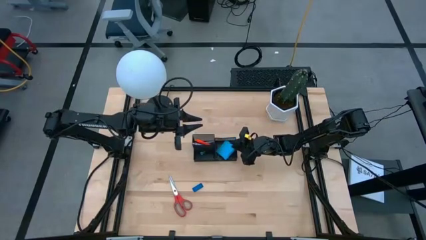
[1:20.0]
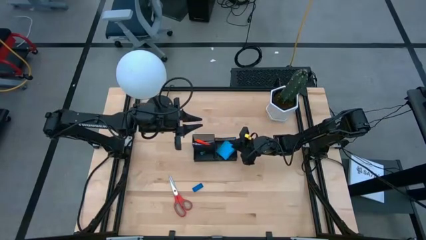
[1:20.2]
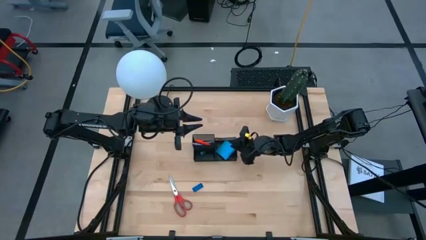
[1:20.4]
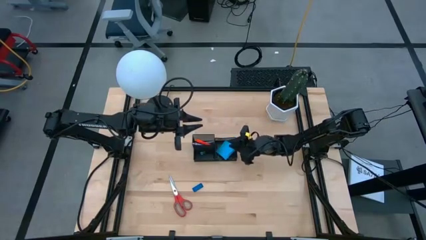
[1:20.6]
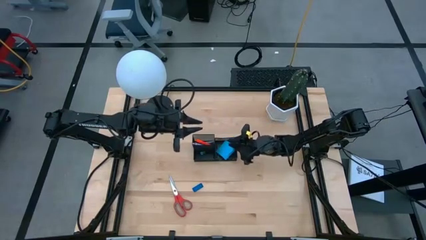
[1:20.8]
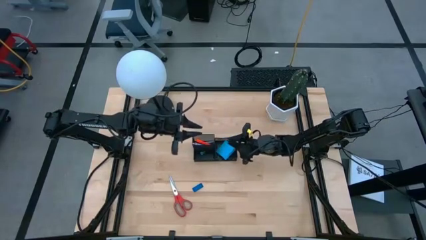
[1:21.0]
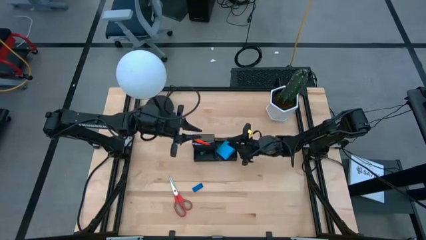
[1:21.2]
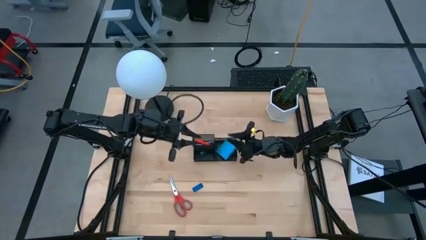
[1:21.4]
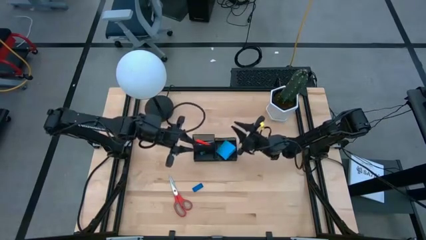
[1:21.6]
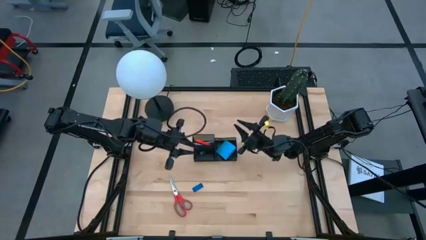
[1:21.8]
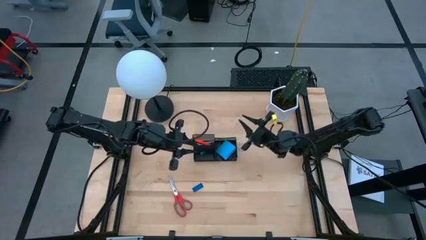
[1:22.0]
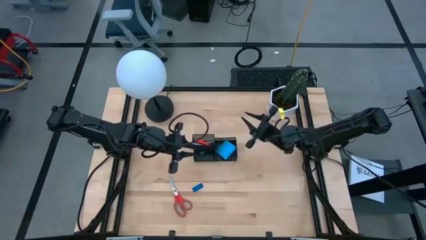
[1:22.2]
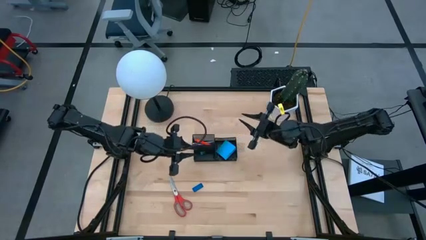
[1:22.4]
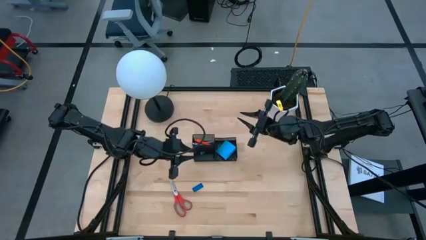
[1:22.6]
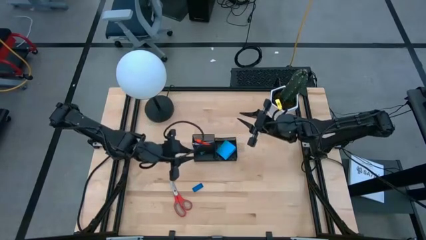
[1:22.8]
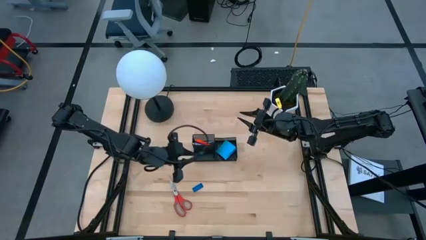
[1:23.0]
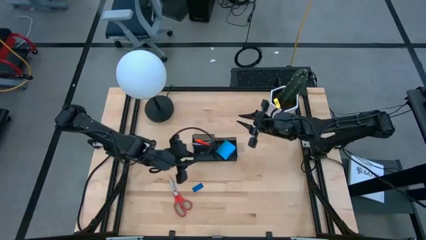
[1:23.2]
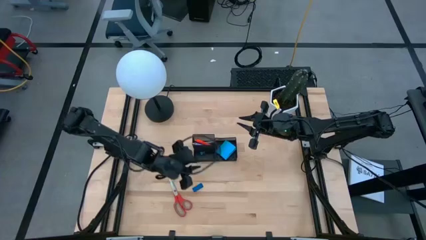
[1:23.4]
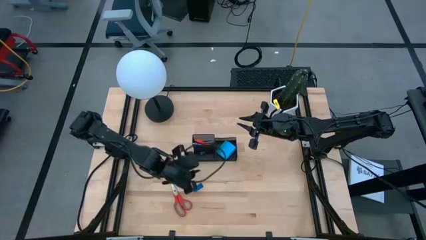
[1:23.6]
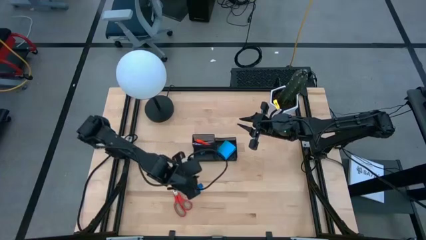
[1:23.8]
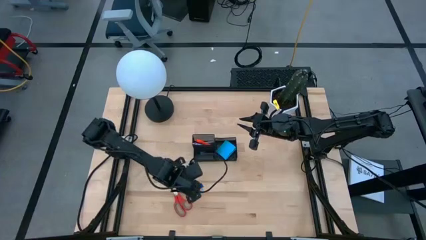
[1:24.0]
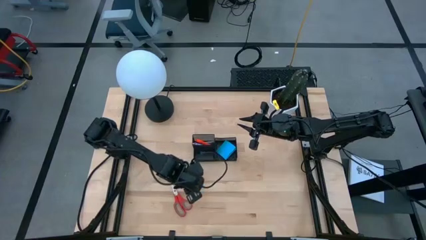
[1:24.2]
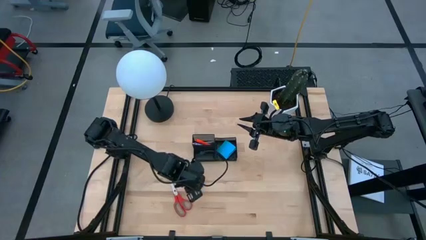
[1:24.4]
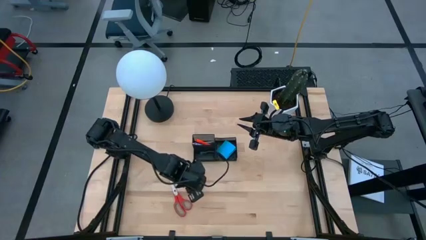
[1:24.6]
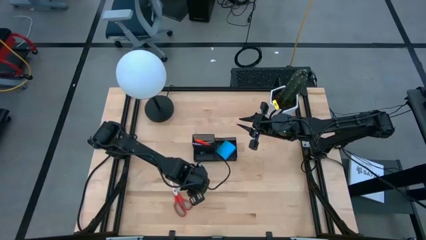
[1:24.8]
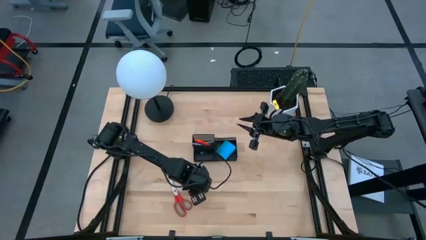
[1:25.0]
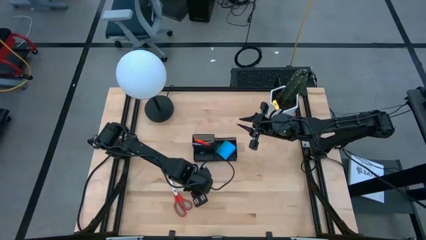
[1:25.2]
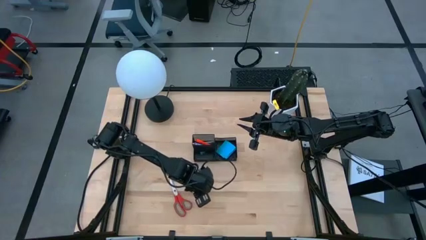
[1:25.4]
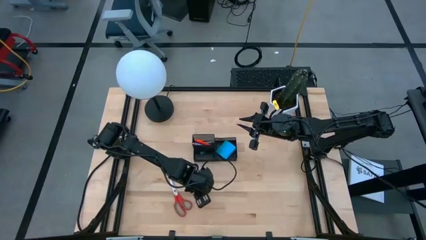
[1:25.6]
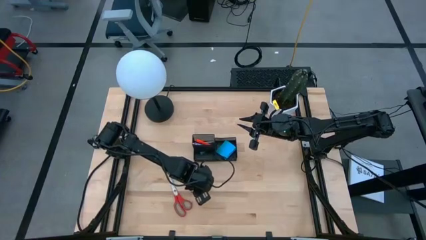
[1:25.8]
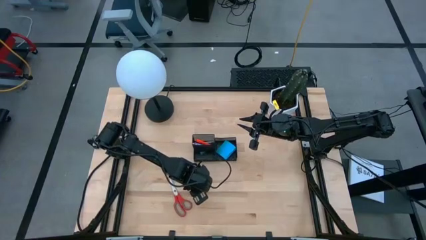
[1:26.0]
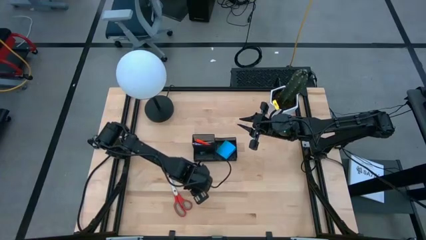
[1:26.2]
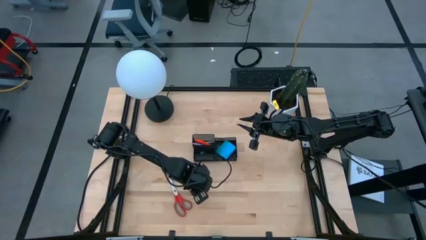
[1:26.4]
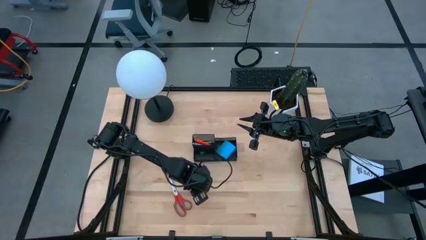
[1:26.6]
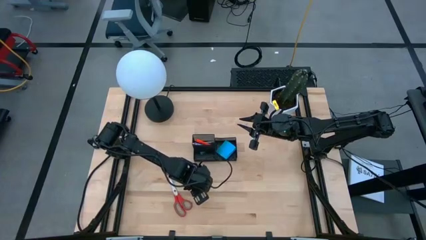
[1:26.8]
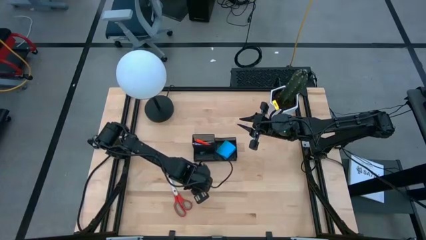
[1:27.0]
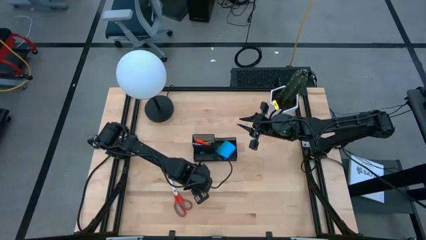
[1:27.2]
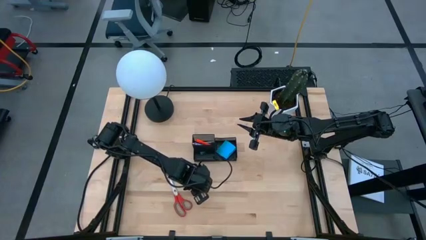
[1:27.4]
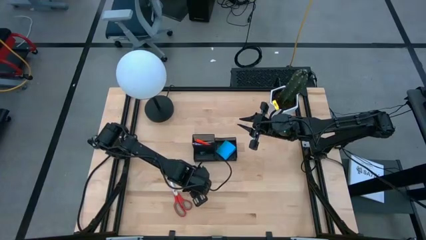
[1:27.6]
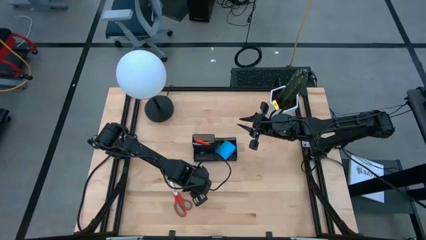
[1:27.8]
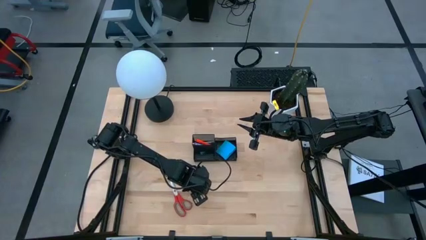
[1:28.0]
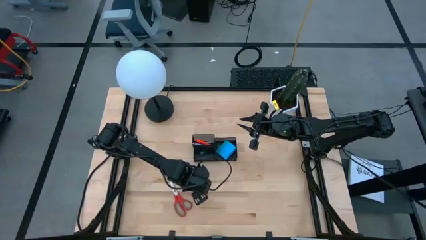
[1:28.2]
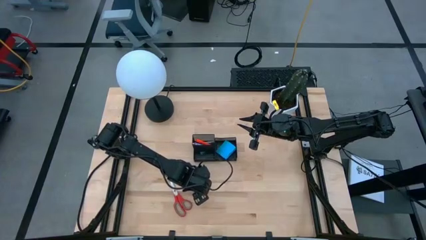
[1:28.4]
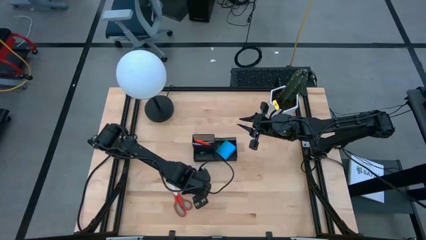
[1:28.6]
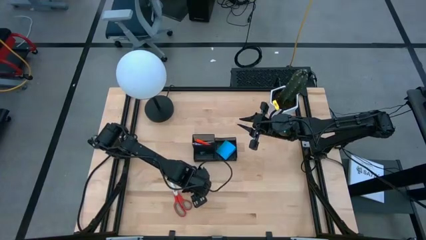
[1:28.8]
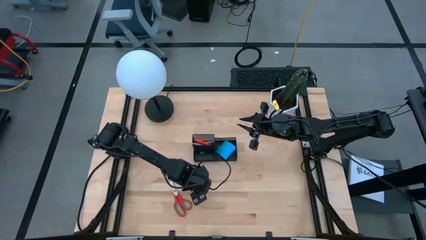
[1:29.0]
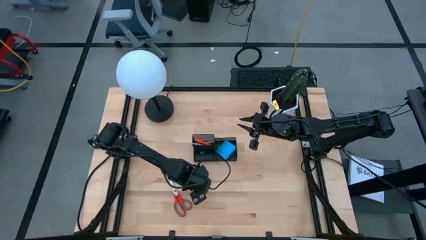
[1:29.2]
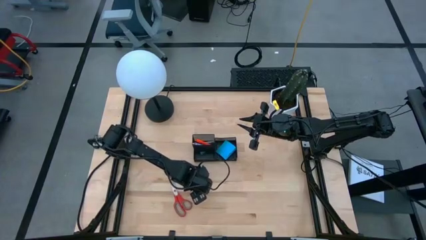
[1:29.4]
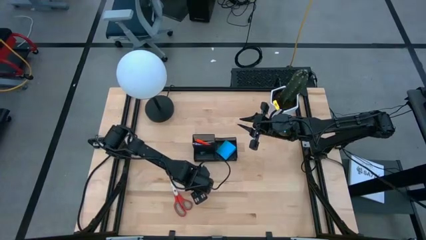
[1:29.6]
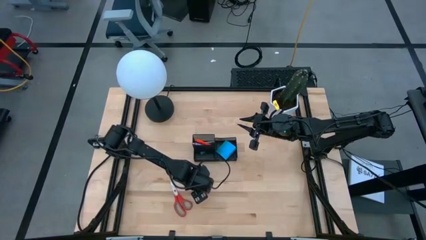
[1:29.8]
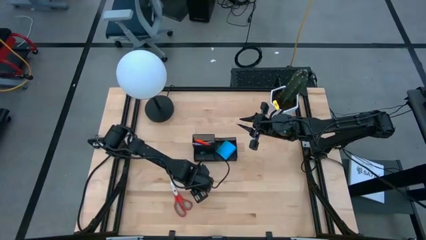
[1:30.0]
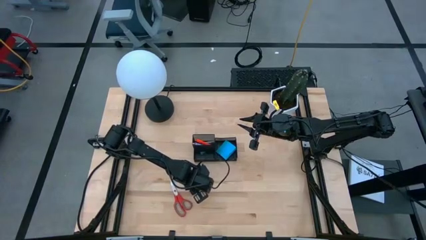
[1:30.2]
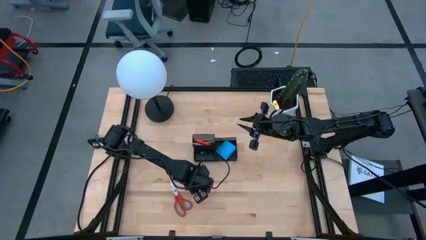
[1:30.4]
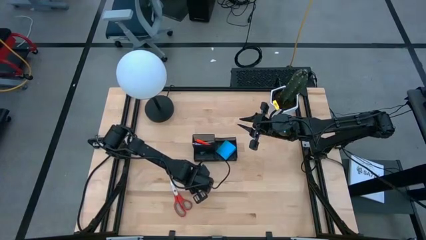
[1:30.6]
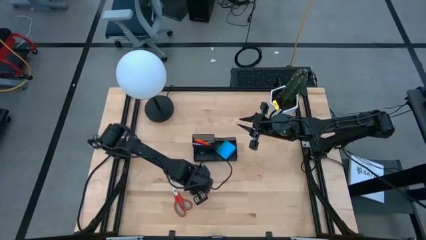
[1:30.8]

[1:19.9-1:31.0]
Task: Pick and place office supplies into organizer
Put the blue eraser into the black desk organizer

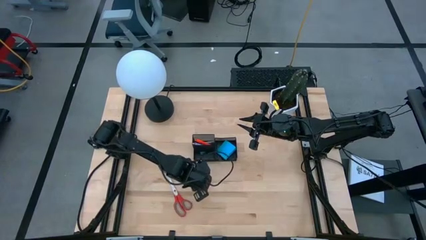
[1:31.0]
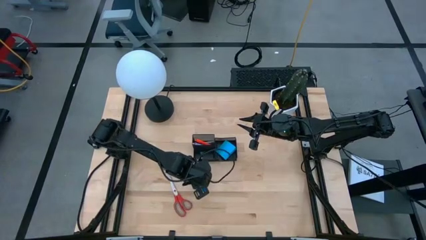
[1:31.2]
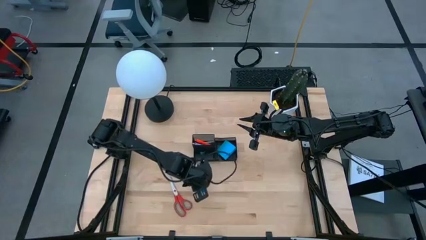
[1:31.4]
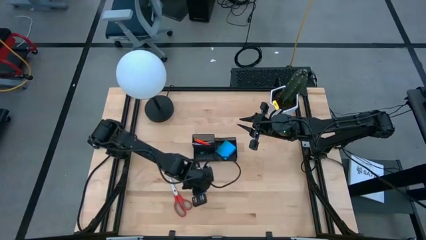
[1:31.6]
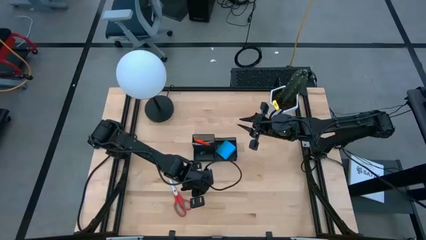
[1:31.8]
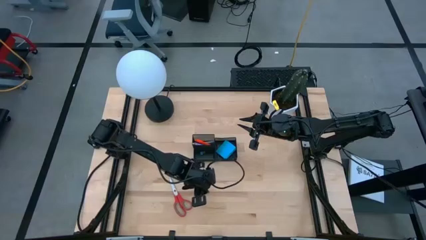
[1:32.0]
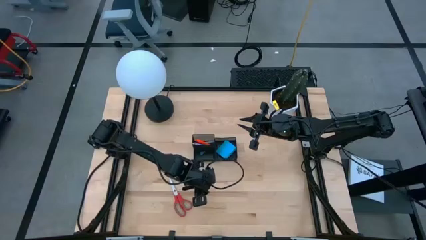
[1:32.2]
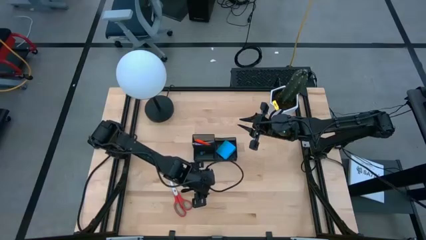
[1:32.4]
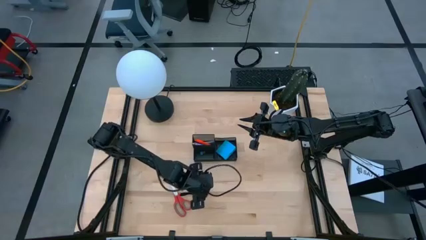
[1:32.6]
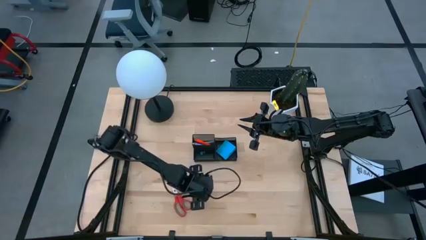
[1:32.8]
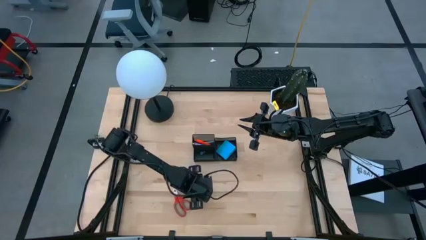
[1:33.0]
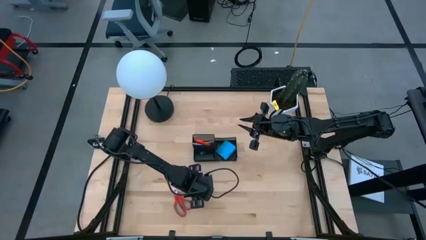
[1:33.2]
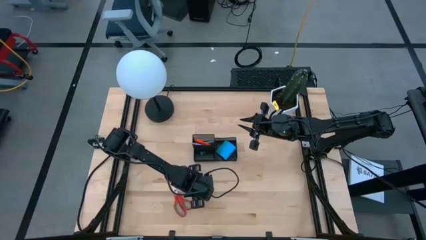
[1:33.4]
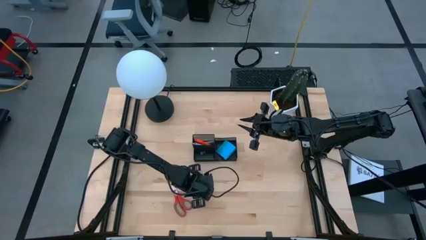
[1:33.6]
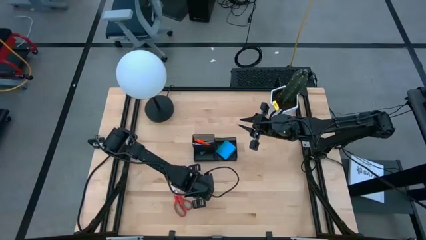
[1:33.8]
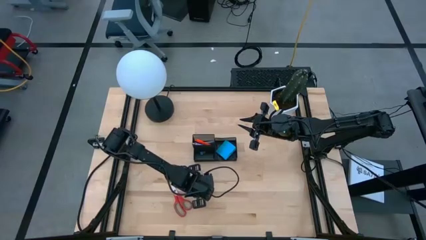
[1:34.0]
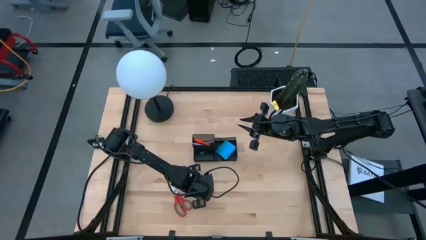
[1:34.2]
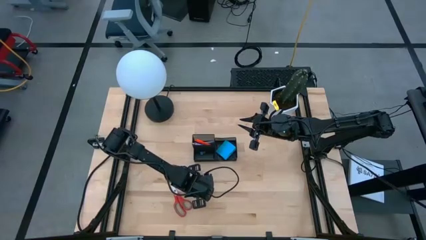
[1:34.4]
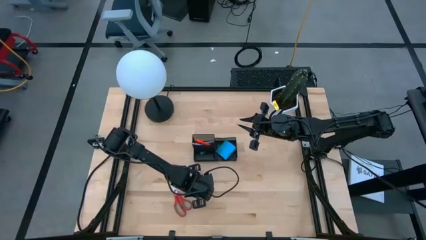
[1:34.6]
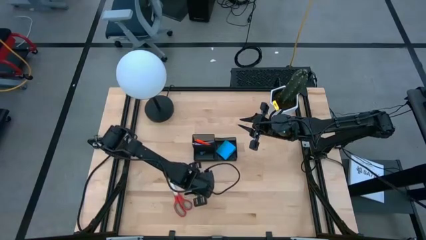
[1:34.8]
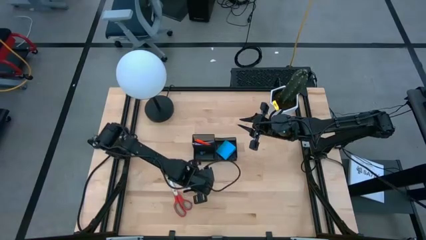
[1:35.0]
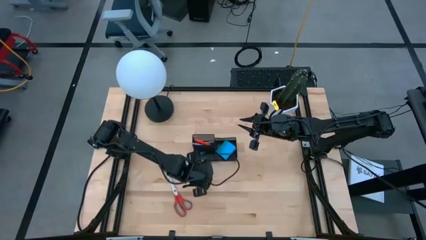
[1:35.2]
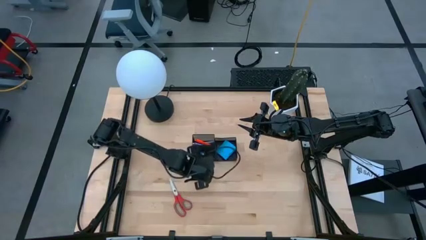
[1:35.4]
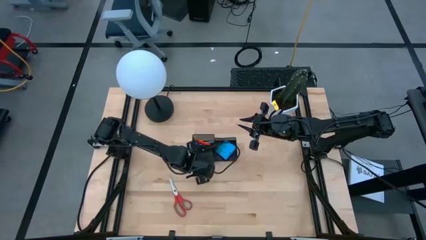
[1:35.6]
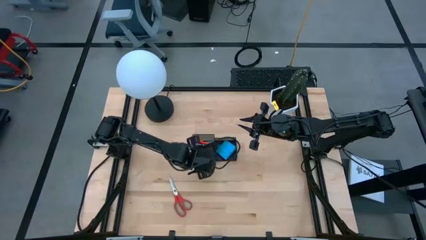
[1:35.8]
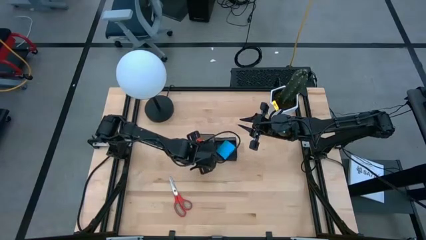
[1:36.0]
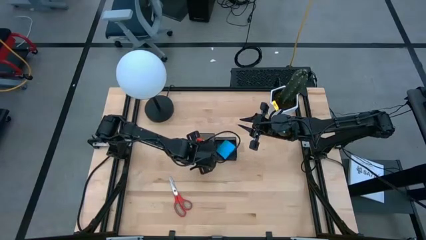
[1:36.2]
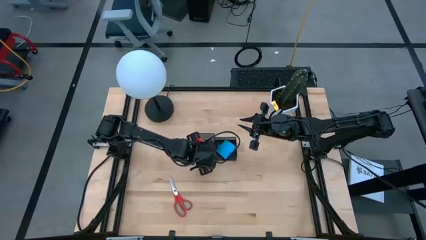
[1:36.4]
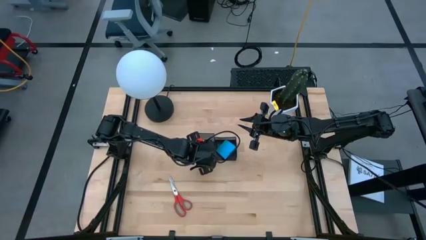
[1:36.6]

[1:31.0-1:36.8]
Put the blue eraser into the black desk organizer
